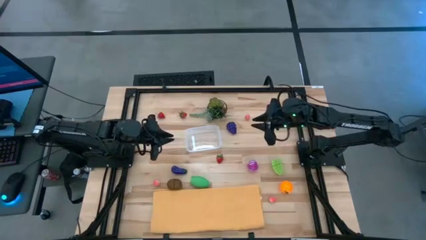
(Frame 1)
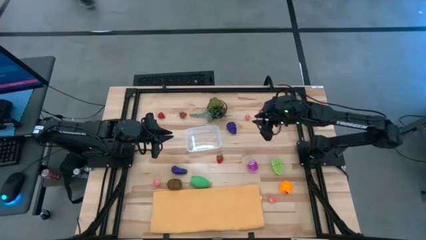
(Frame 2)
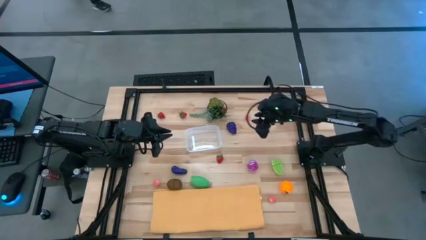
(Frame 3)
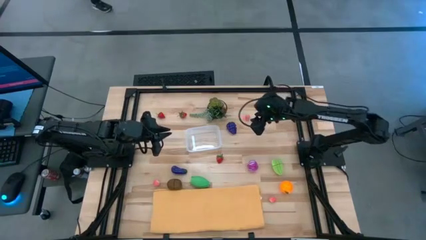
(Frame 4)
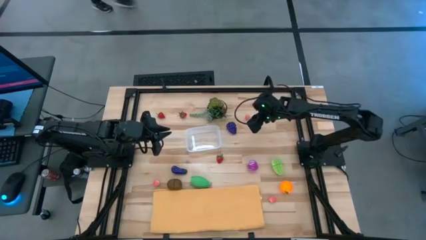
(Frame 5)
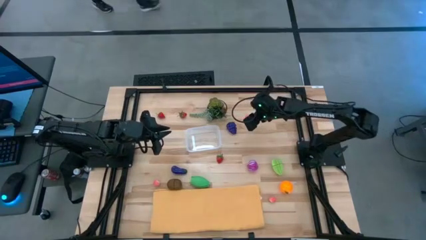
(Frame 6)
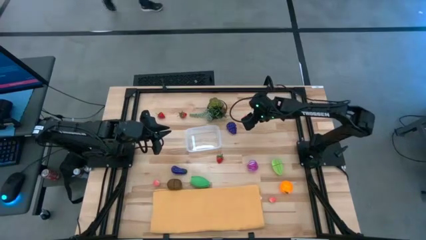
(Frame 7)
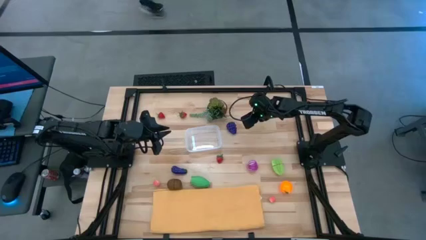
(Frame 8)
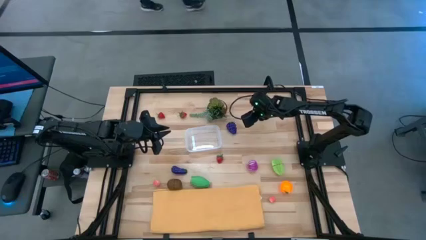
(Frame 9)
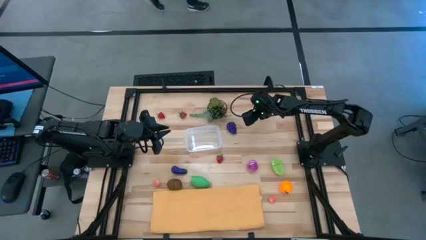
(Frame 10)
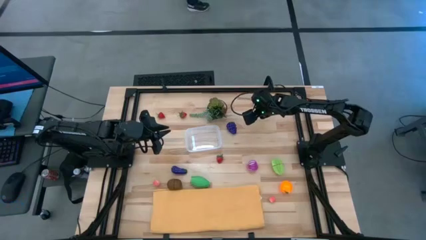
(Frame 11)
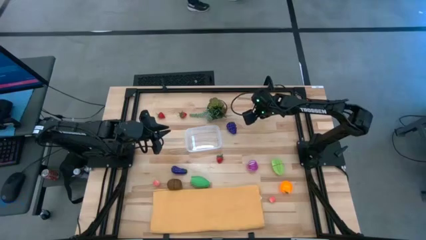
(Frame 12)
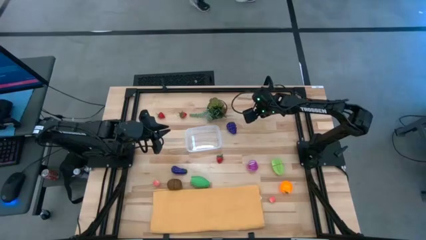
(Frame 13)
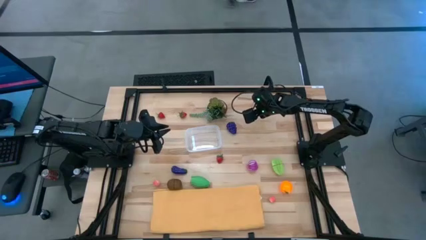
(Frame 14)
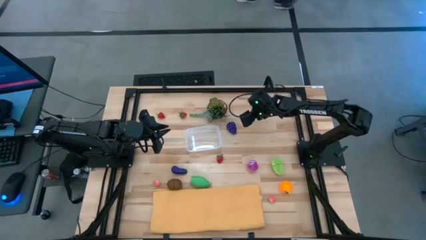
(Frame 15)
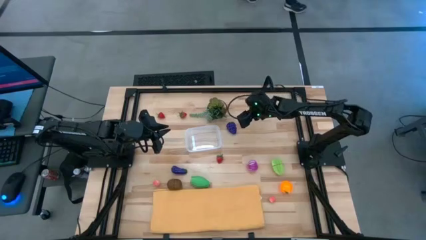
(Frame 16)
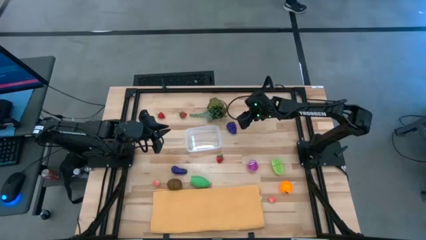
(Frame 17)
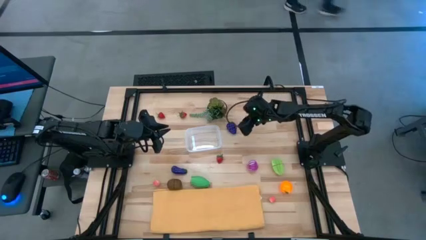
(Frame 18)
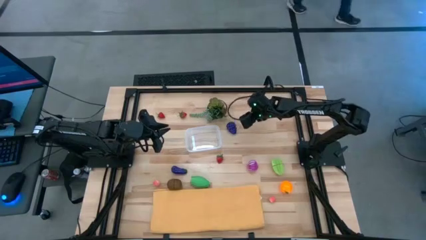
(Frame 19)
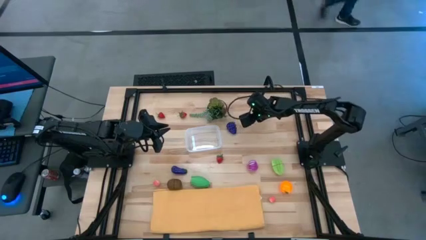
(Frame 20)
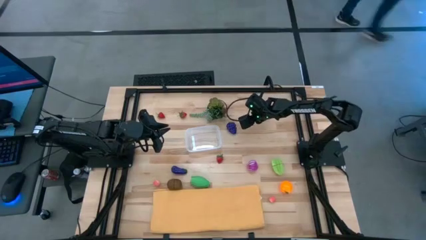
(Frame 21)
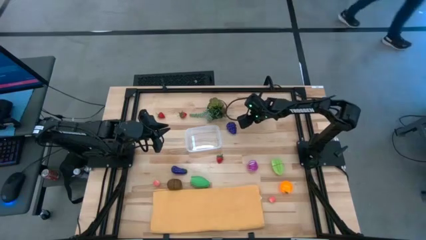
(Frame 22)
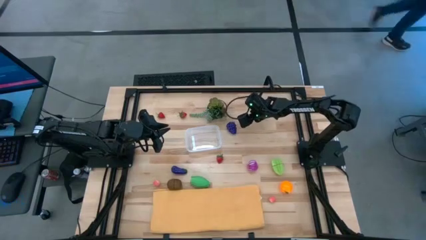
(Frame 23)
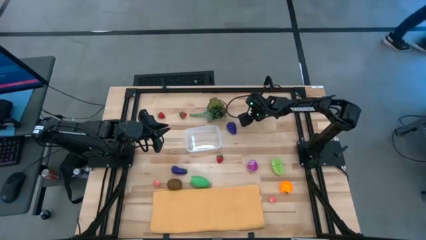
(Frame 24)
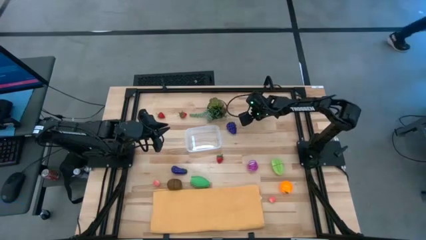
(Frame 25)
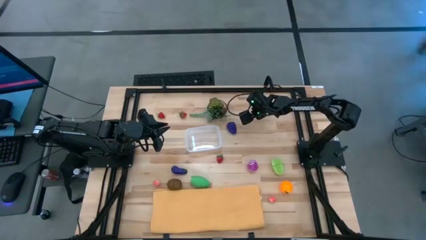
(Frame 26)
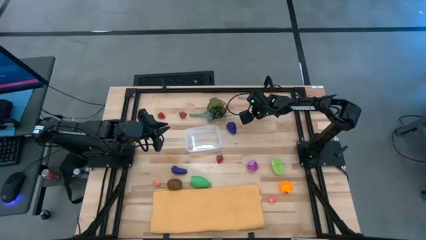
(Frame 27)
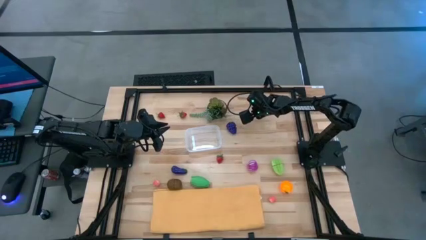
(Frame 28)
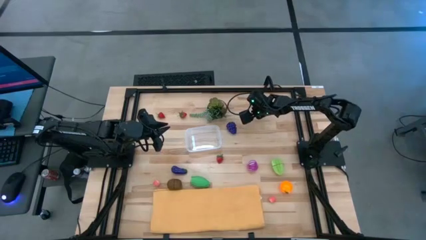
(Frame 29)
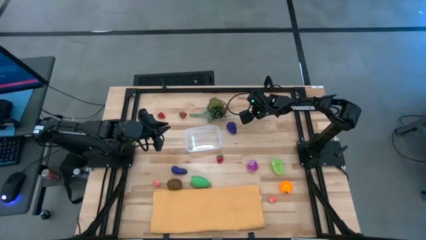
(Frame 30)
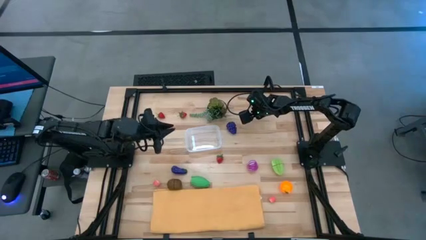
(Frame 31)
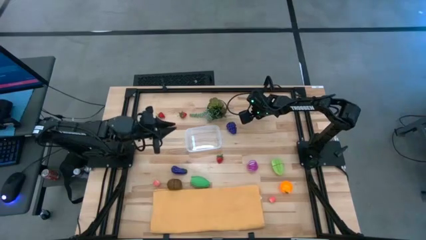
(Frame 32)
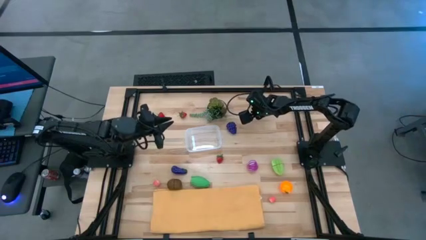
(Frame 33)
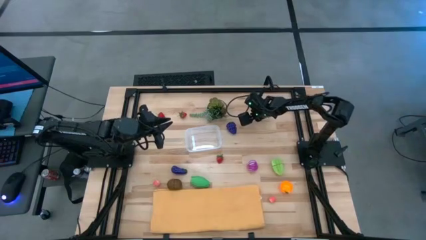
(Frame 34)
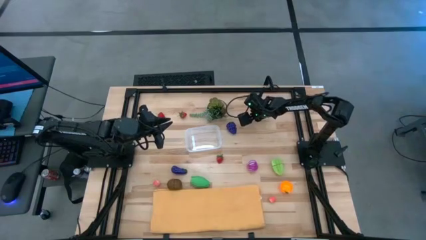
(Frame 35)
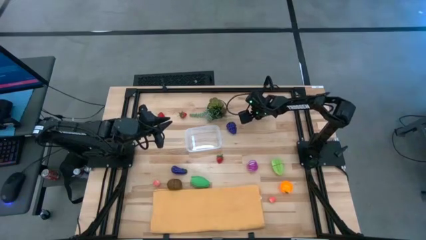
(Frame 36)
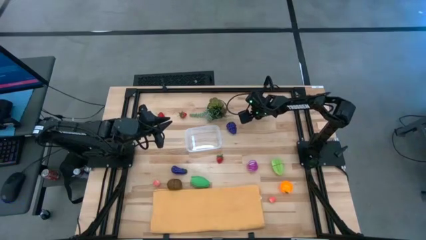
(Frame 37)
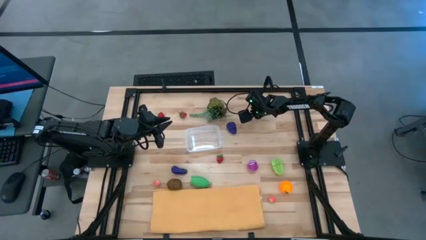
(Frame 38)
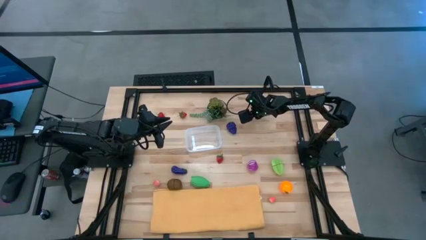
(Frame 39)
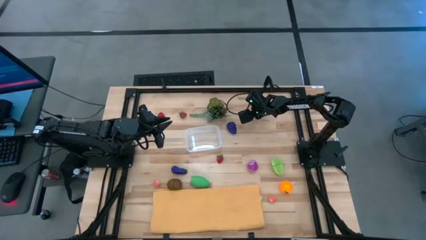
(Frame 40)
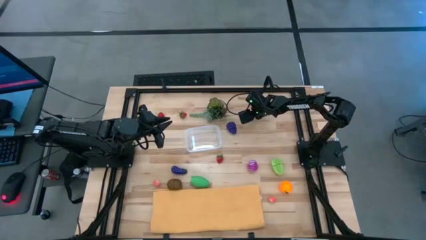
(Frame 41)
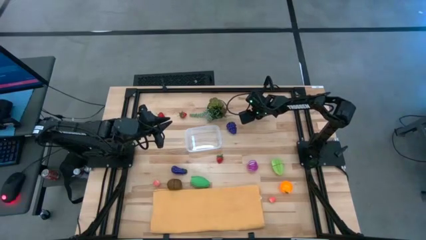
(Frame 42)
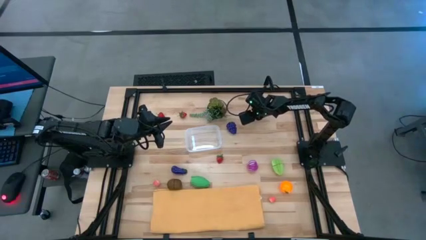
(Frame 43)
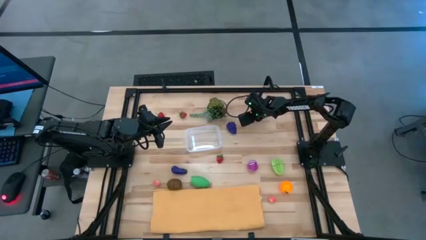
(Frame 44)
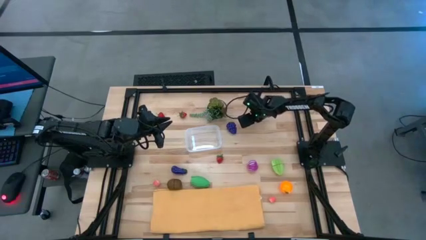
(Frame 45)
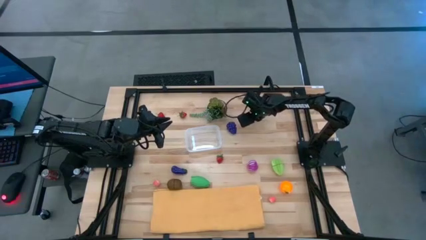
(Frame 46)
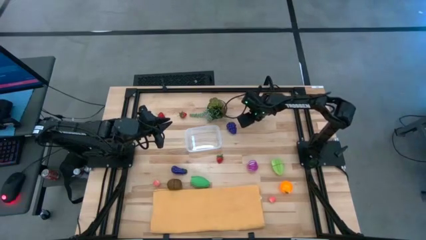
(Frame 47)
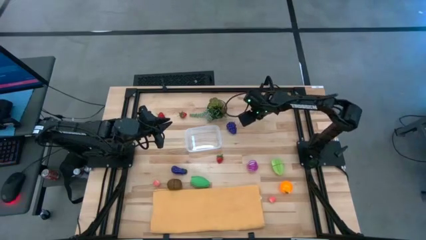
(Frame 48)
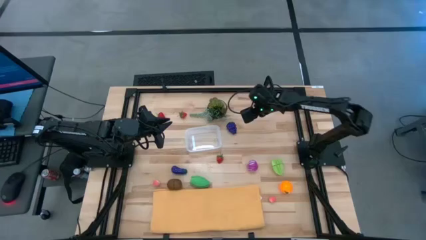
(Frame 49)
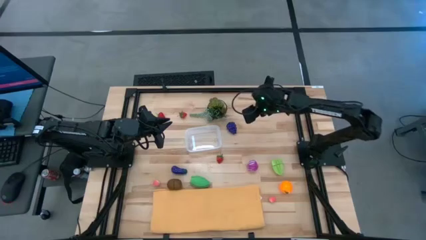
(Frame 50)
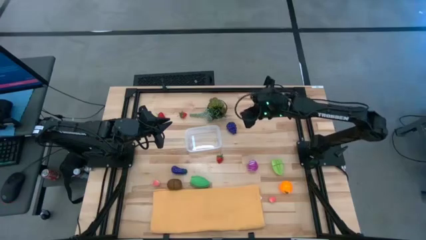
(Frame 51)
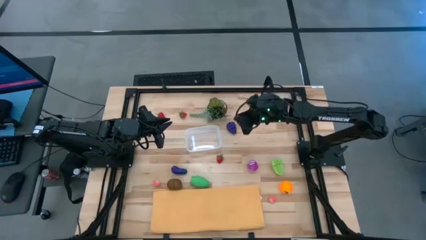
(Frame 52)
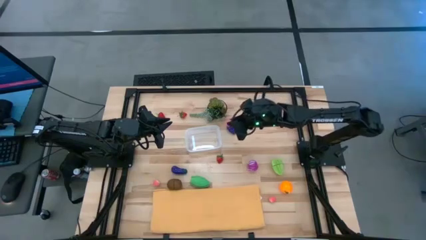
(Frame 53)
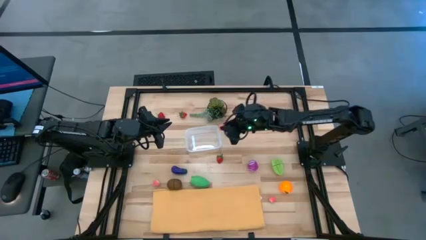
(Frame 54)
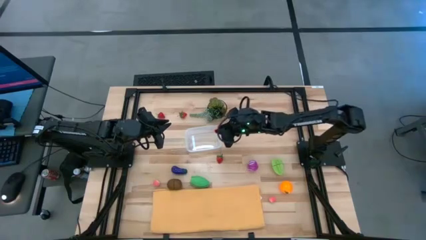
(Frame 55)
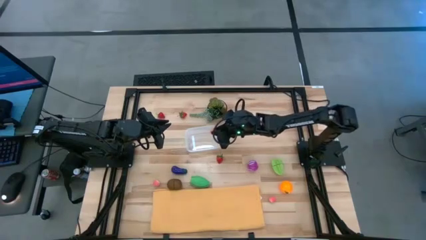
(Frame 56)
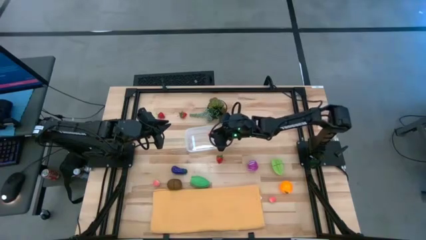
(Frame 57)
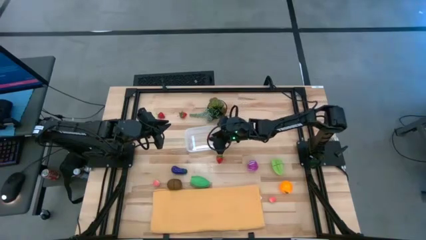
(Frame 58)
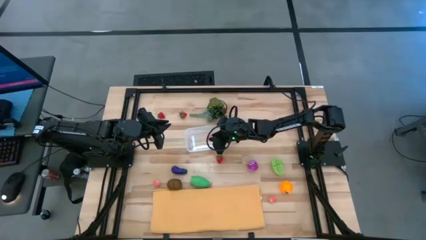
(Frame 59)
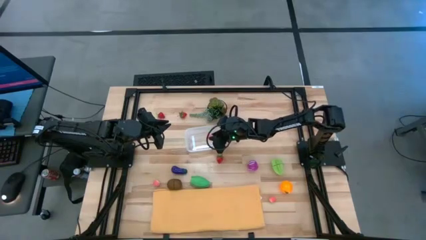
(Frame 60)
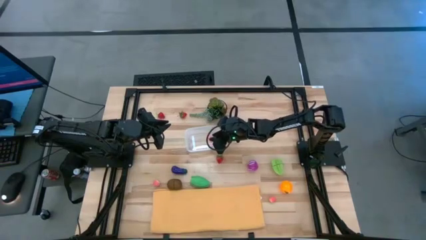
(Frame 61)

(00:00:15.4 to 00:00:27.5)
Task: Pick and placing Produce into tupperware
Put the top right pink peach into the transparent bin

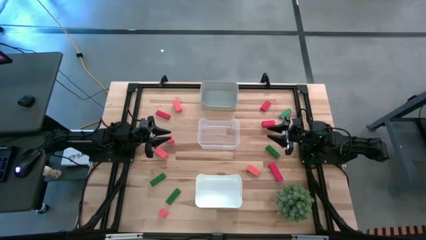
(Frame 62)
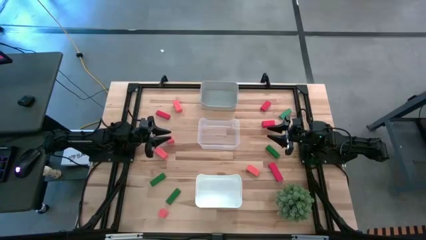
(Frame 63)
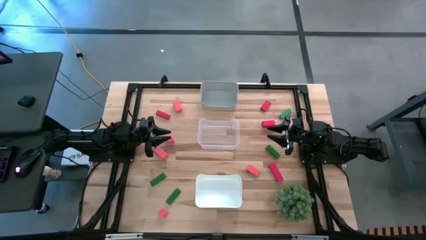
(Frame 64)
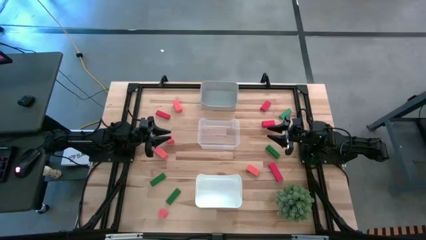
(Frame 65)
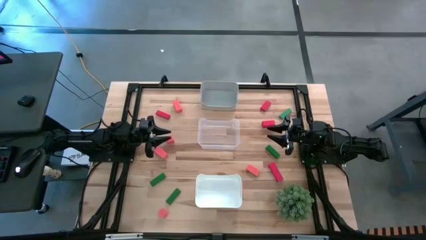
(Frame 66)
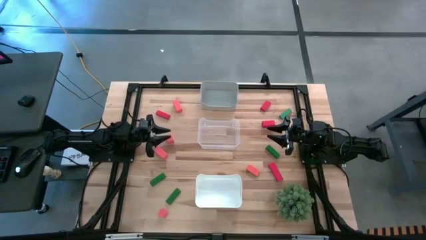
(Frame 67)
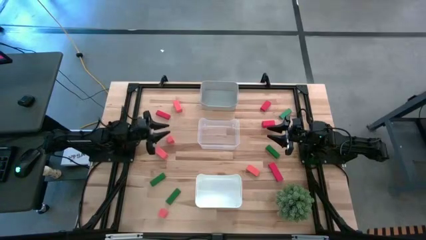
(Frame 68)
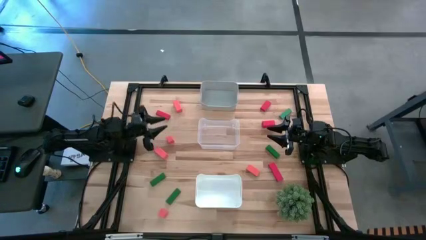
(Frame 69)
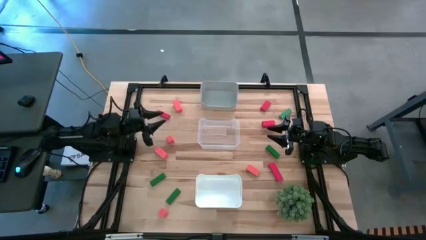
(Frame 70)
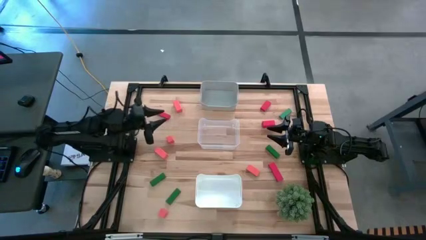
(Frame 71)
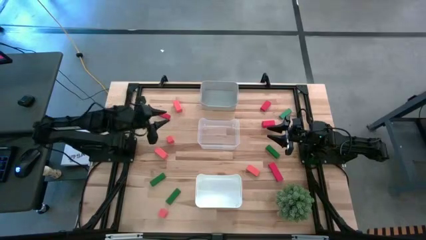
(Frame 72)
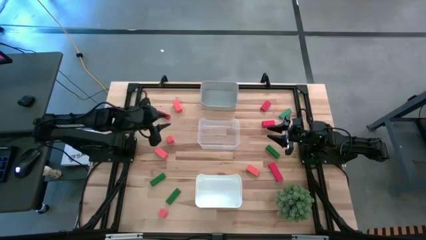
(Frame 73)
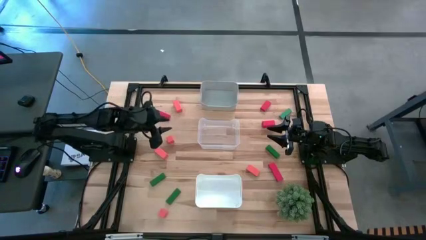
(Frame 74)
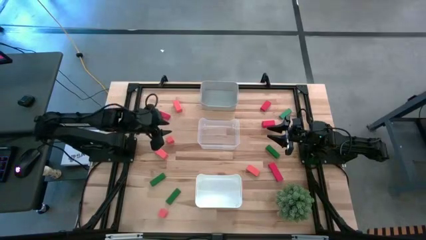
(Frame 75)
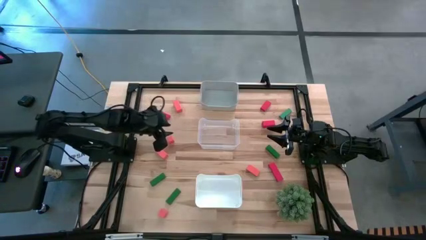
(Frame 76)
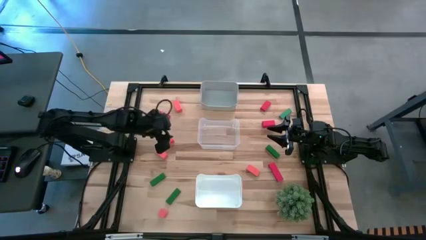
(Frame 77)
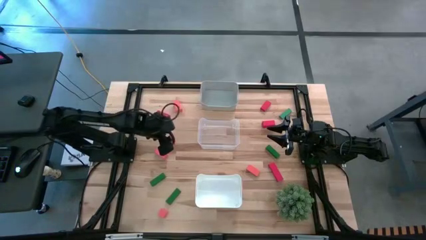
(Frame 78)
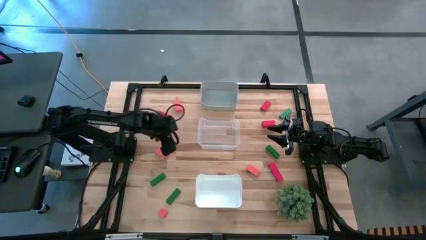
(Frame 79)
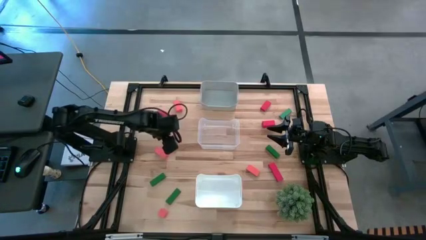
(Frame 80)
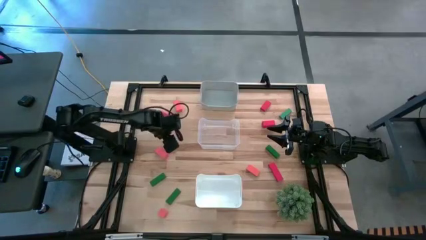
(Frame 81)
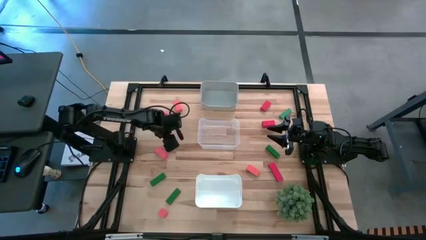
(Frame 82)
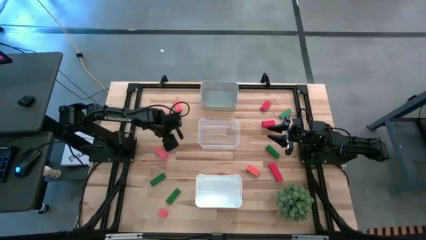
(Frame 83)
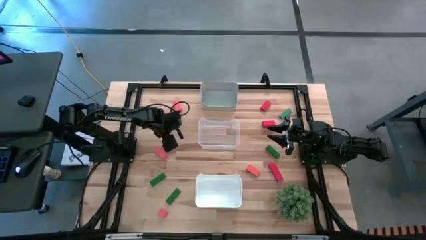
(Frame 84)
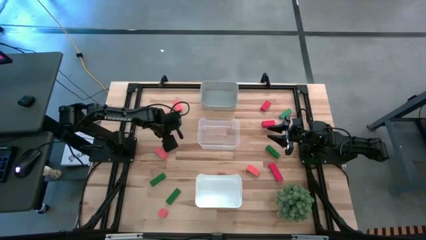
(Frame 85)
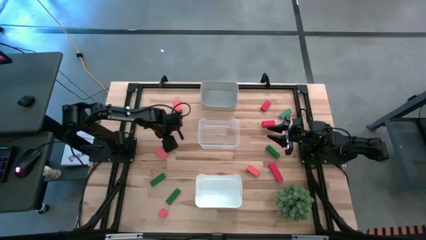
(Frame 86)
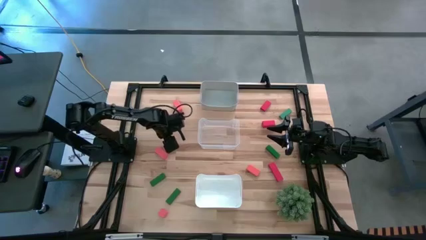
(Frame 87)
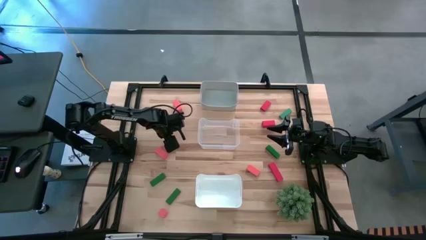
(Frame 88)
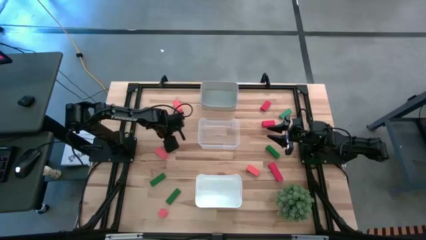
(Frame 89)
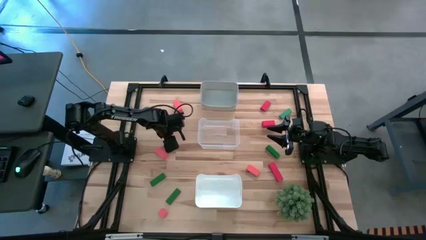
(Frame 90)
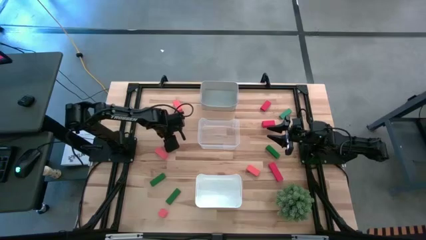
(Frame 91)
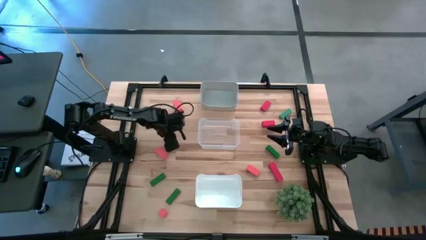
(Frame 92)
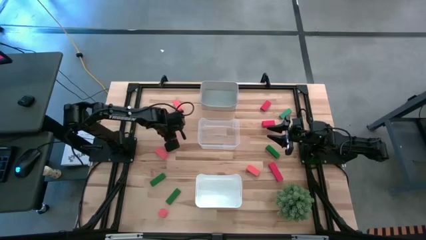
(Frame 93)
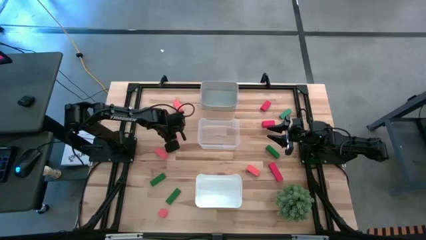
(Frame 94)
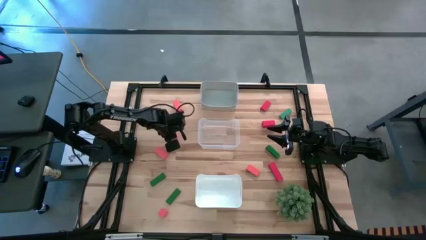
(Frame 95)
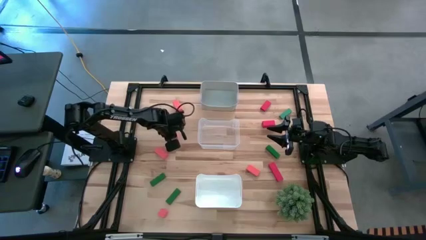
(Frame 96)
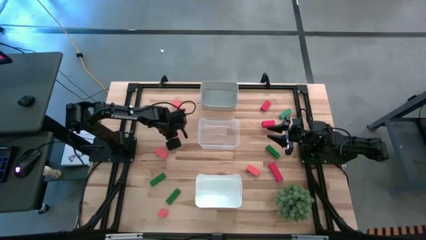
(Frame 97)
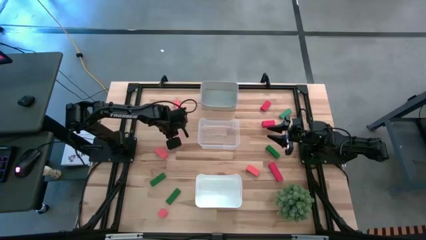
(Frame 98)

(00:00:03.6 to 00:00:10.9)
Task: Sort & place blocks by color
Put the orange block into the transparent bin
